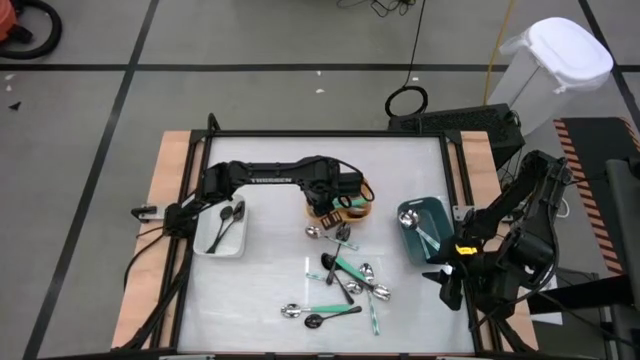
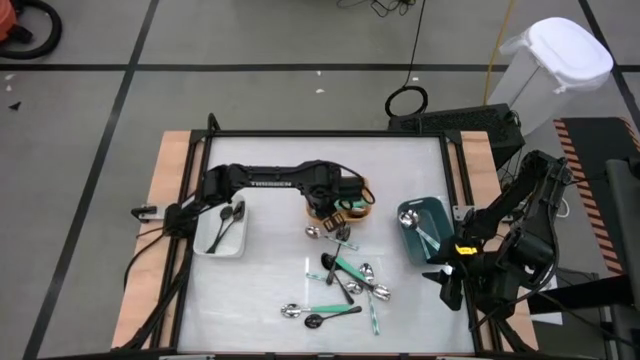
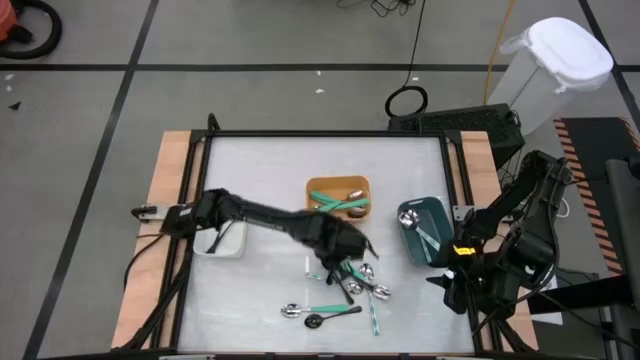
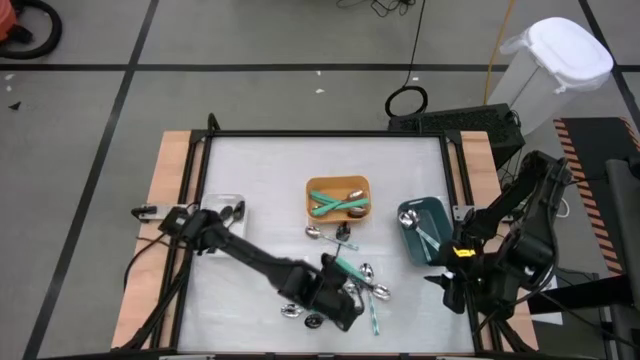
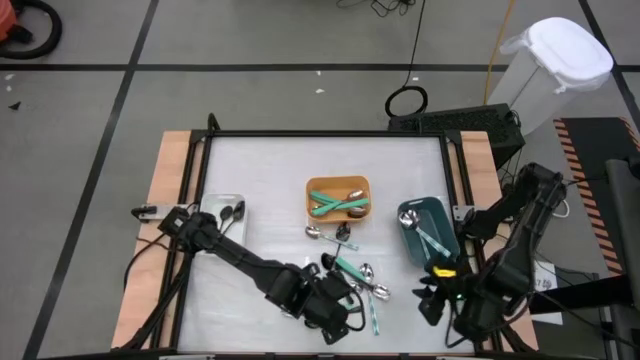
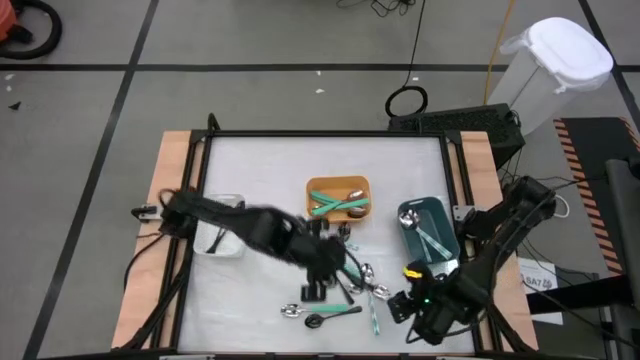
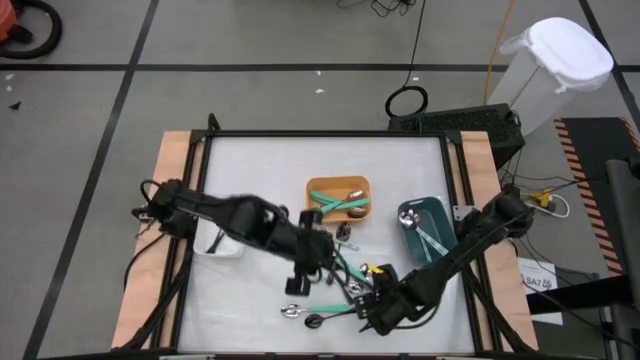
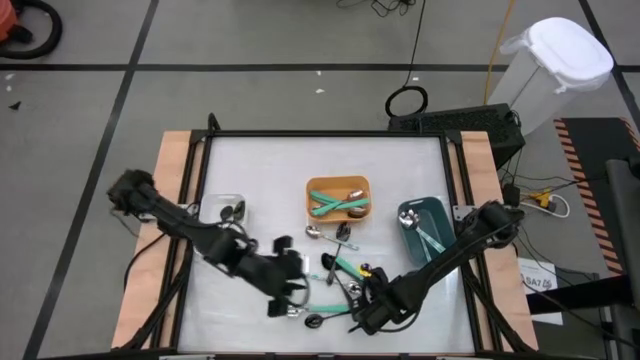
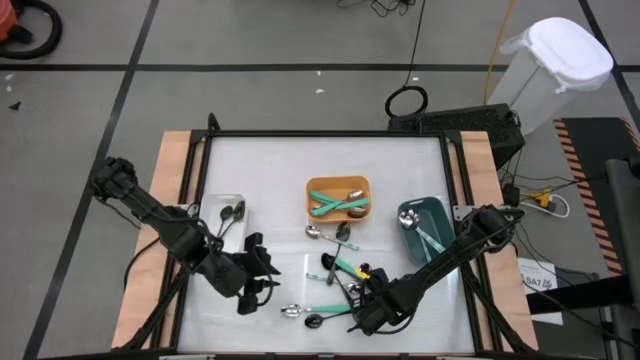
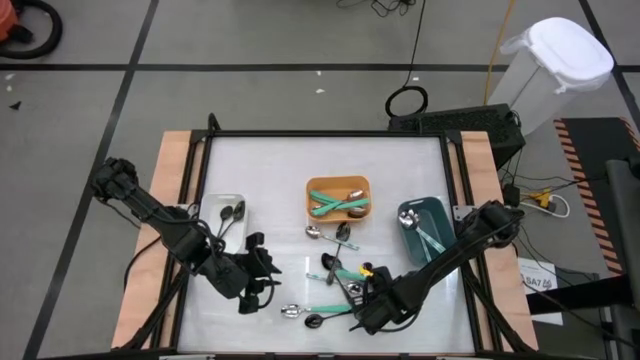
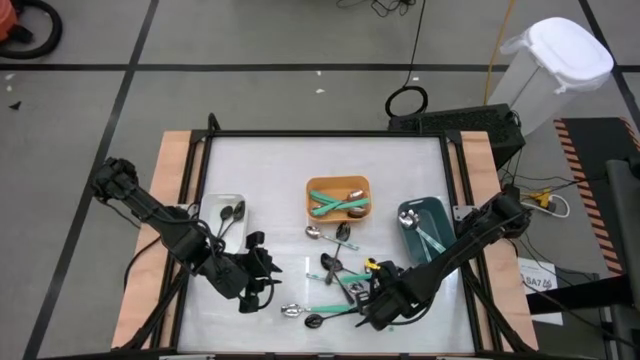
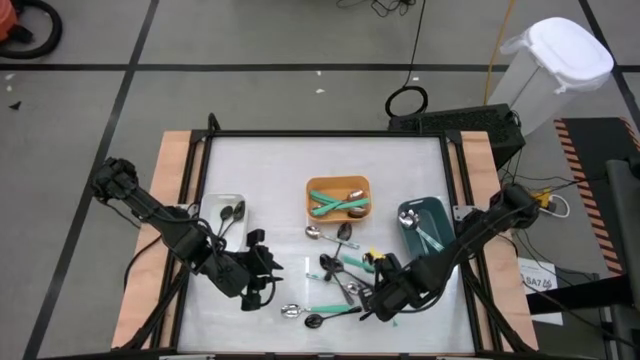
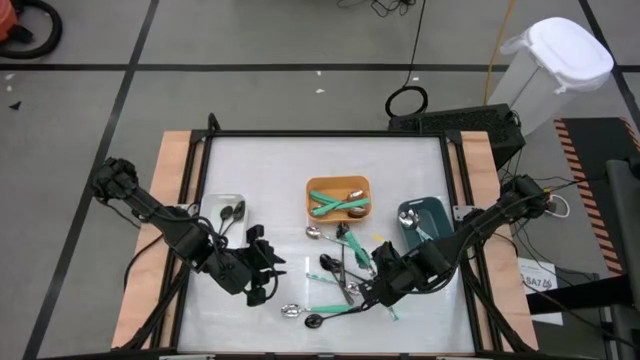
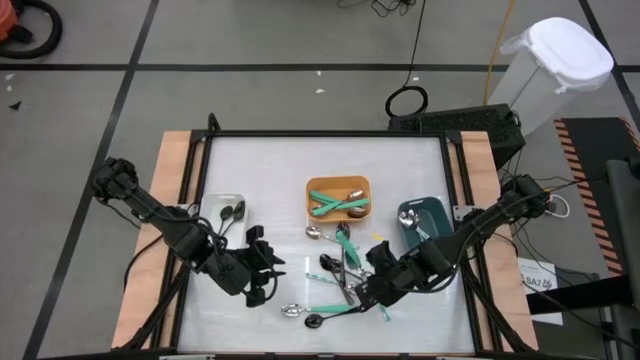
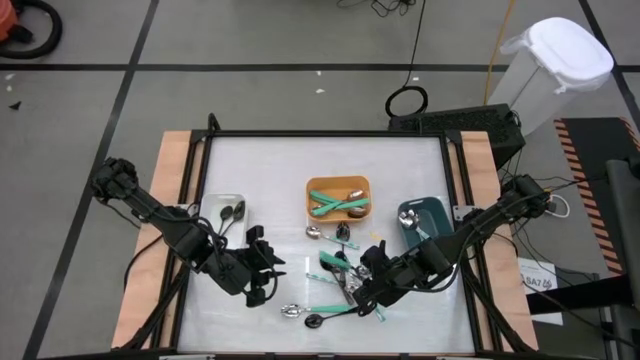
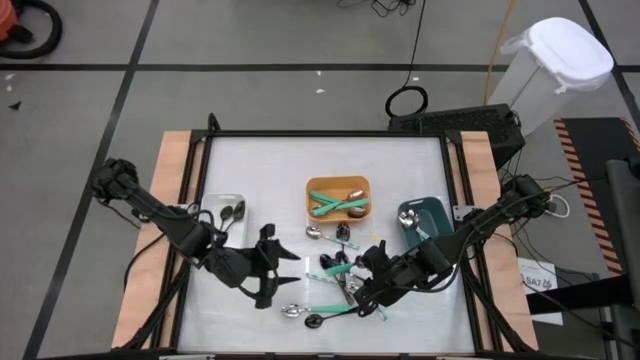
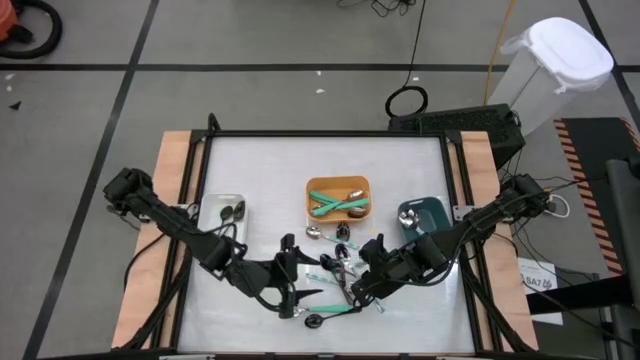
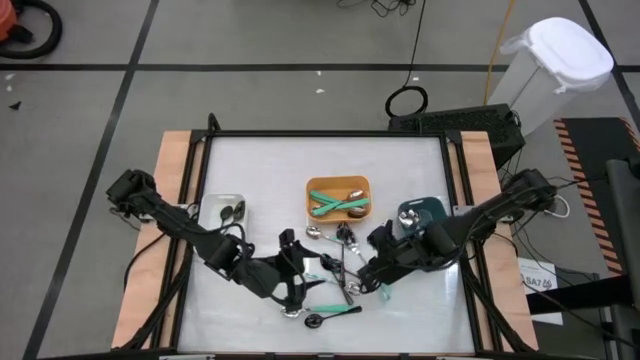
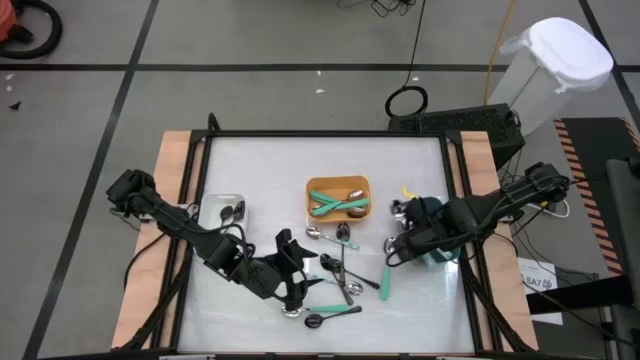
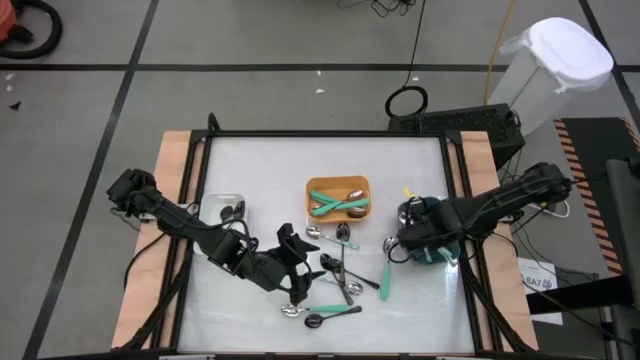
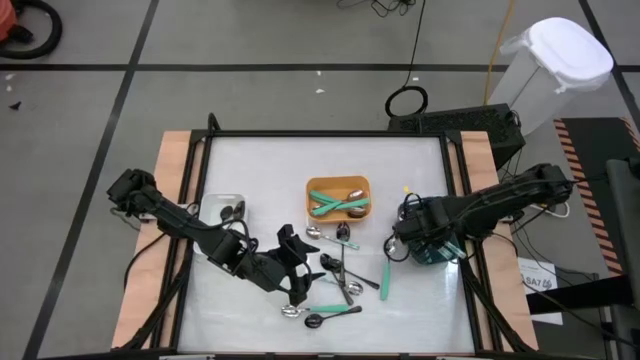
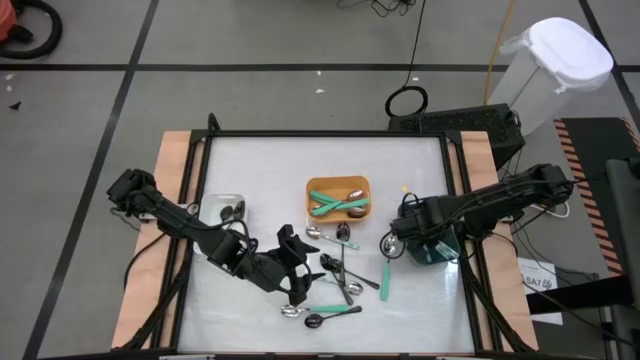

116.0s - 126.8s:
Task: Sort silverware by color (type)
Put the white spoon into the blue bin

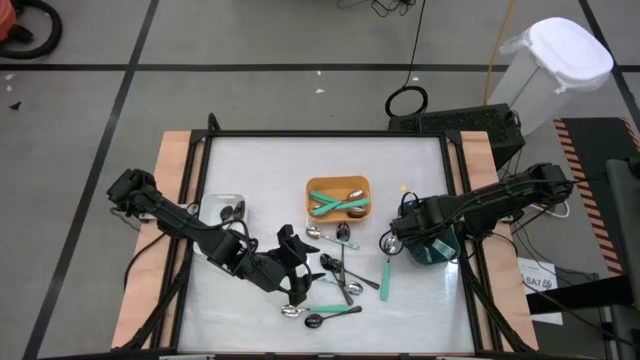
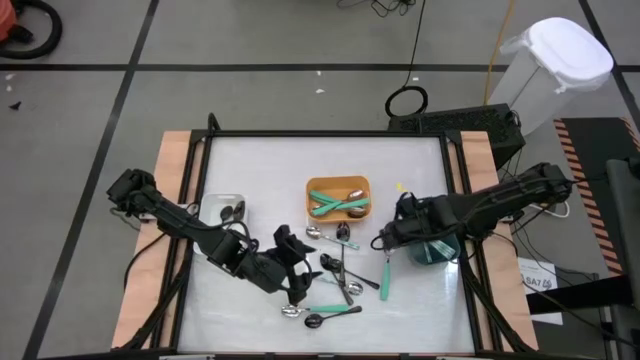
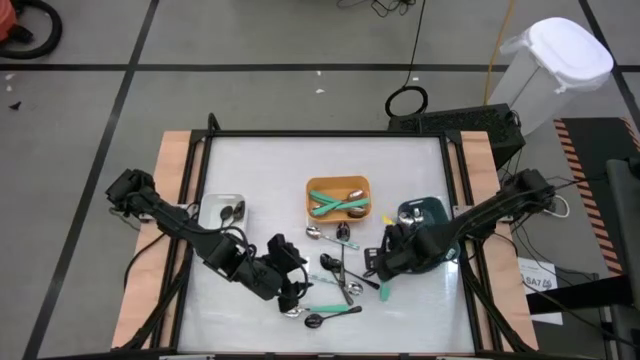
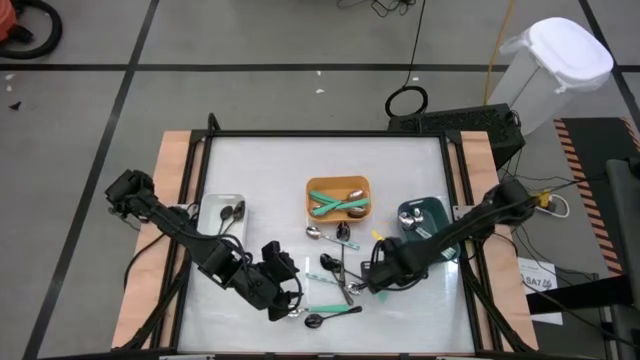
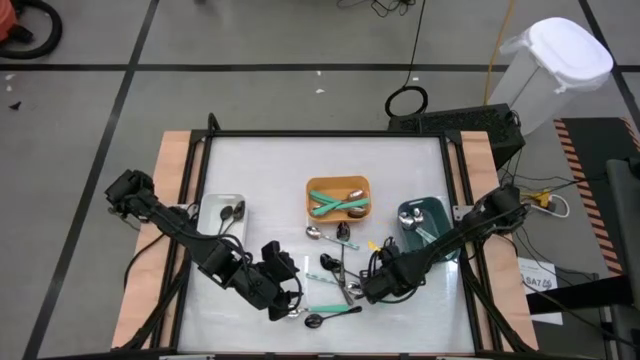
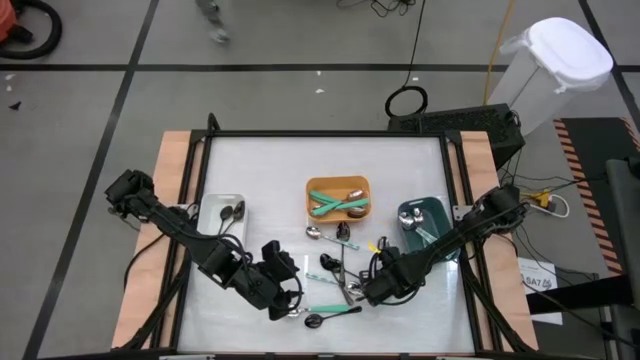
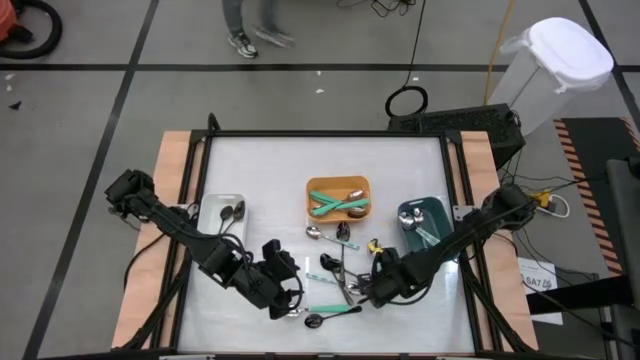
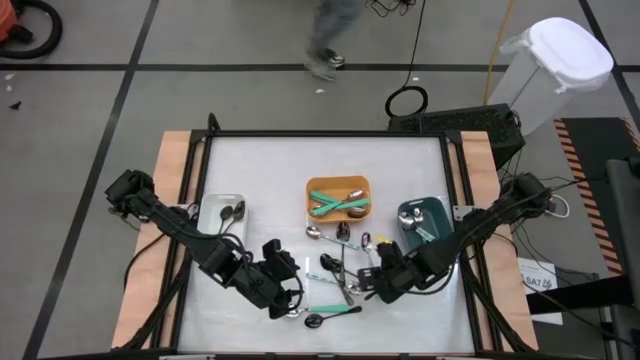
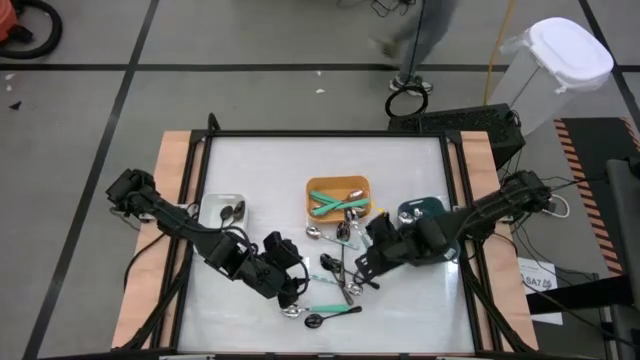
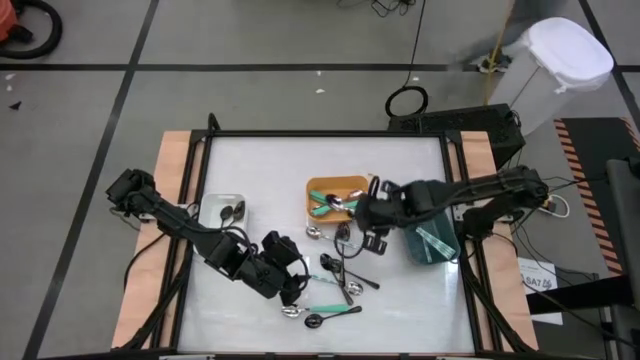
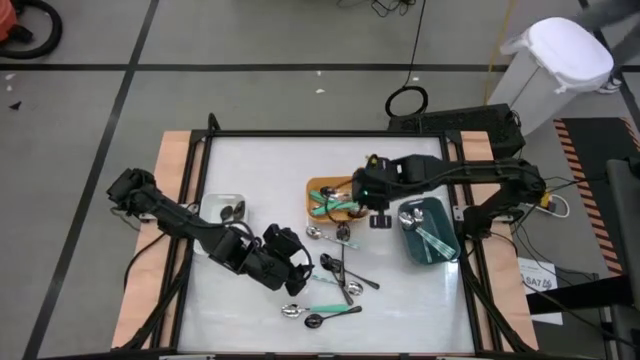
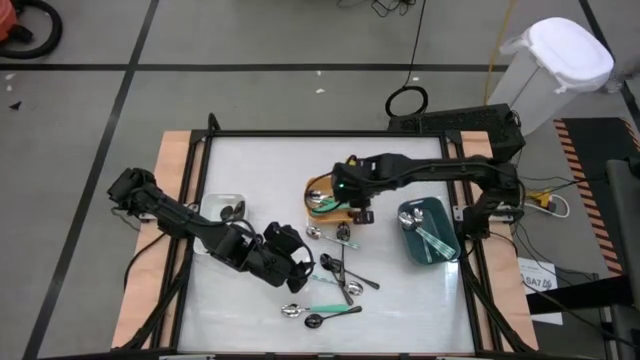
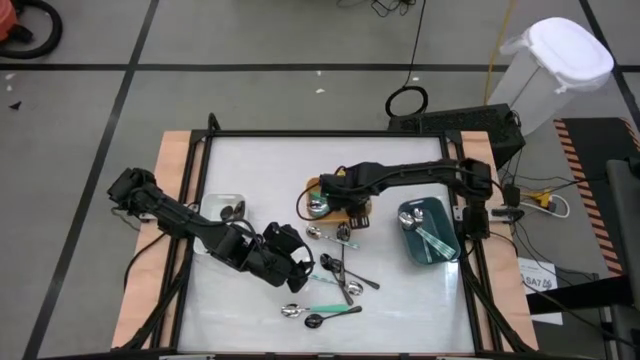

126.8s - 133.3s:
Put the green spoon into the orange bin

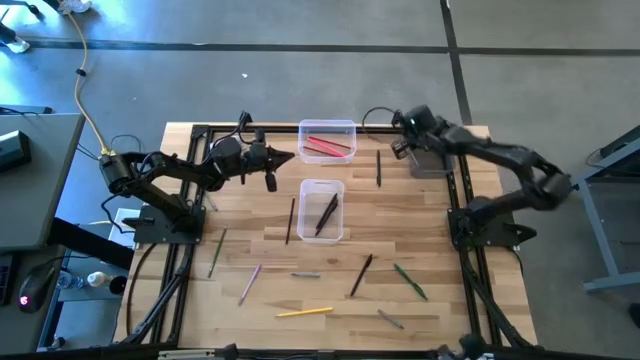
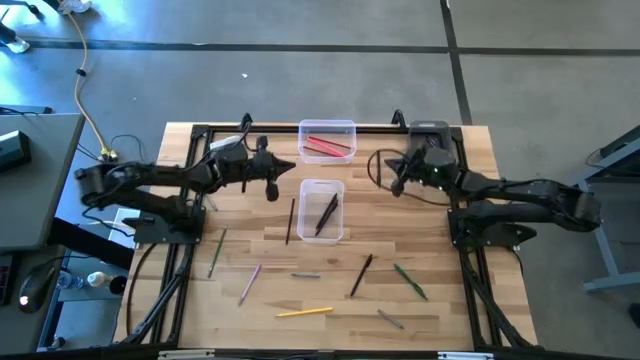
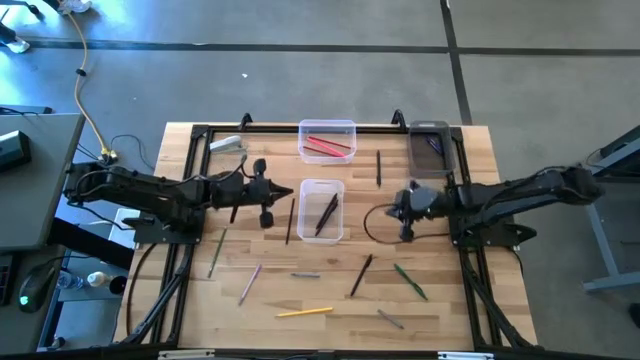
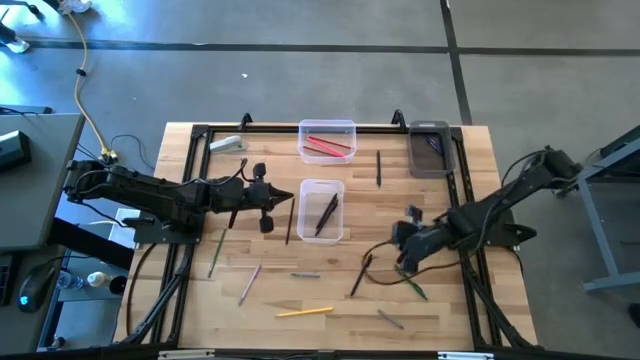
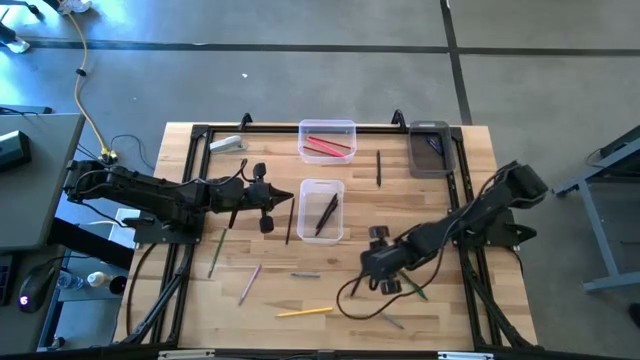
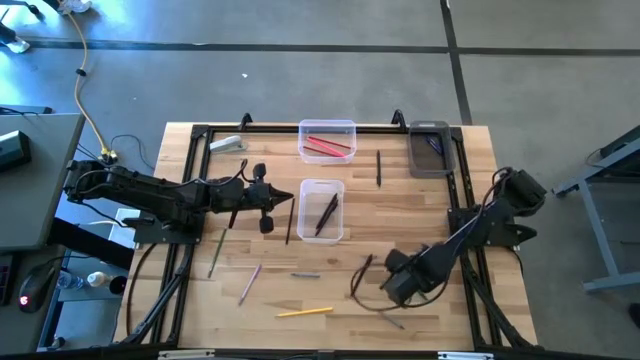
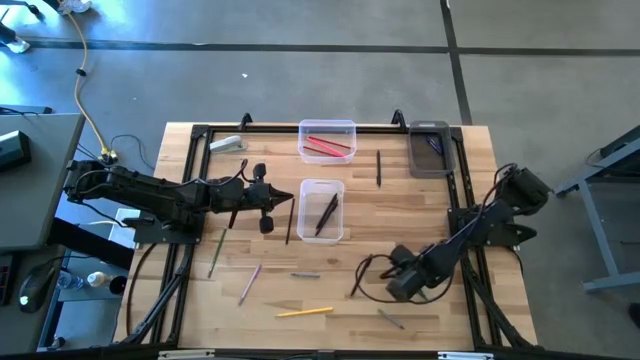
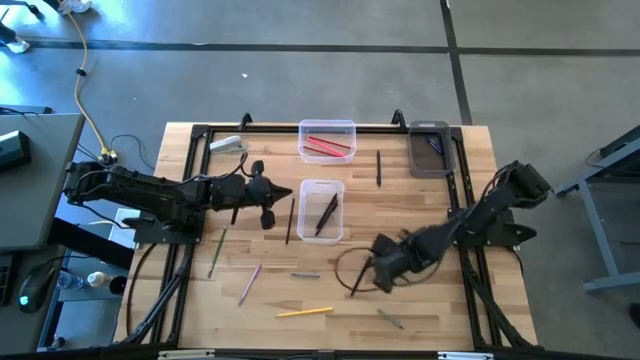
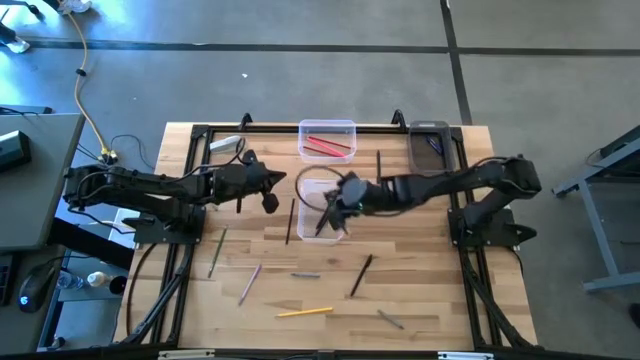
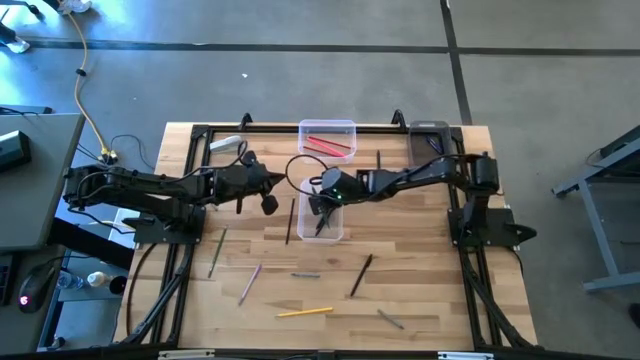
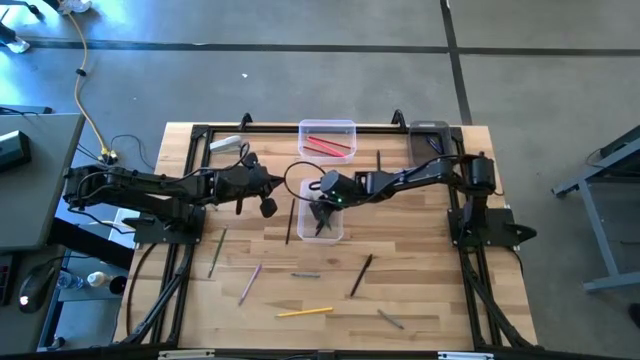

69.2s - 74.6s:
Task: Sort crayons/erasers/pens/pencils in bins
Put the green pen into the bottom transparent bin
